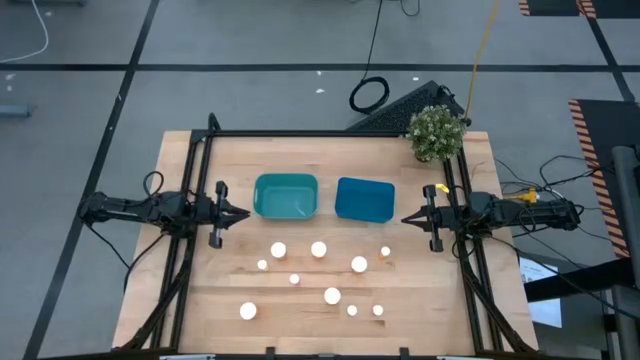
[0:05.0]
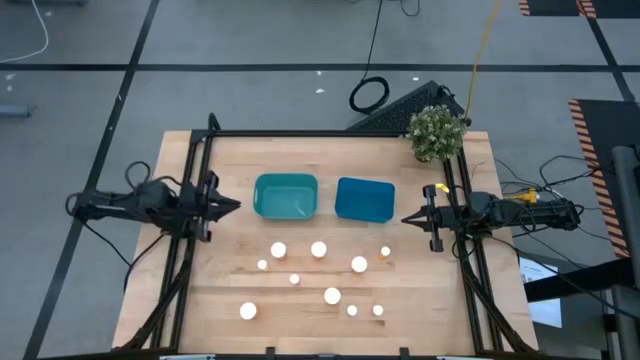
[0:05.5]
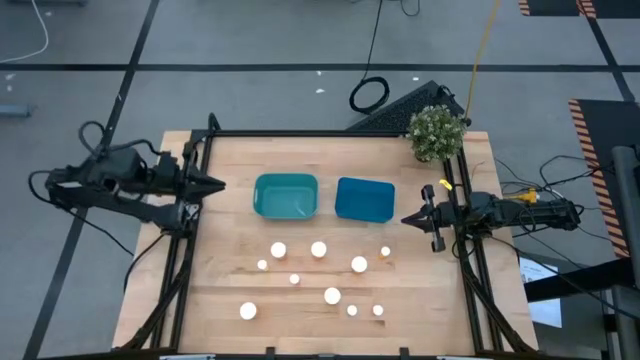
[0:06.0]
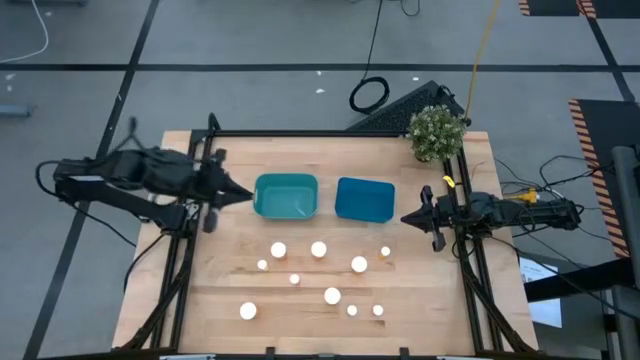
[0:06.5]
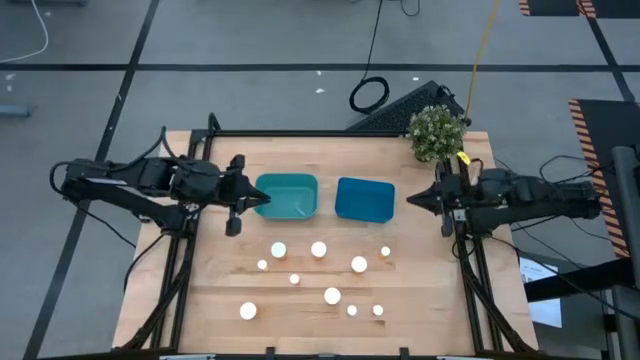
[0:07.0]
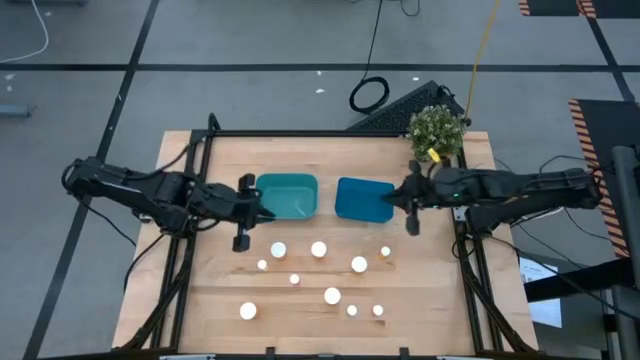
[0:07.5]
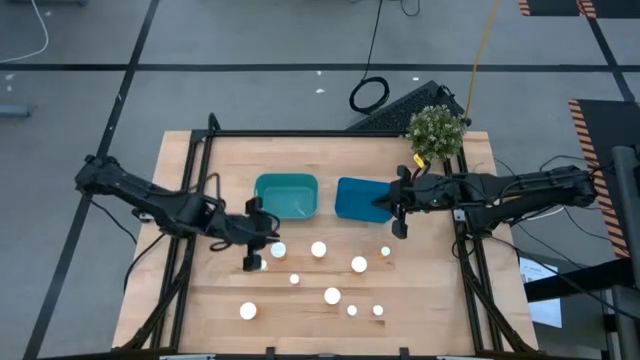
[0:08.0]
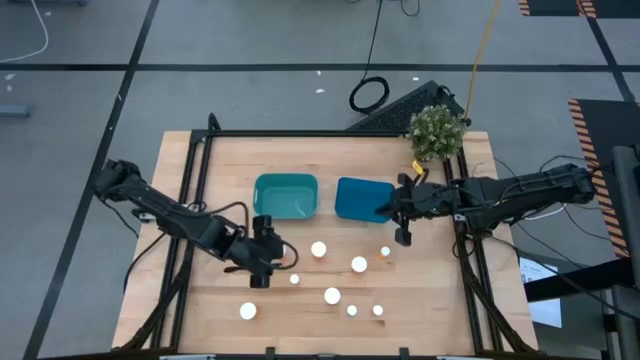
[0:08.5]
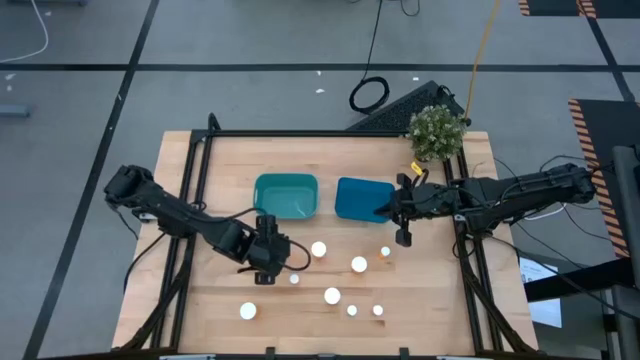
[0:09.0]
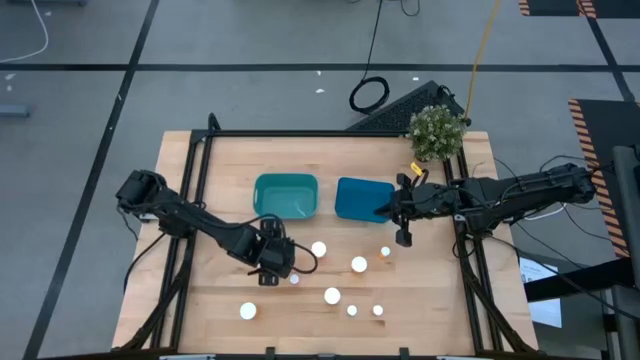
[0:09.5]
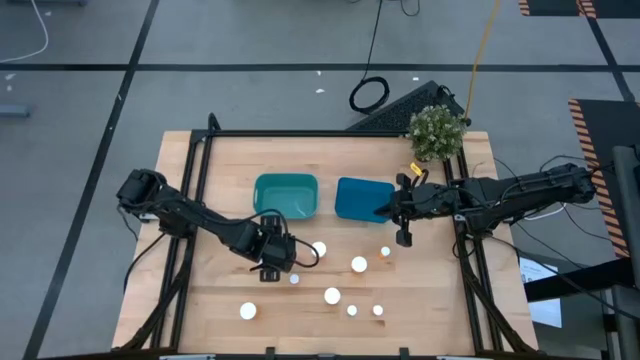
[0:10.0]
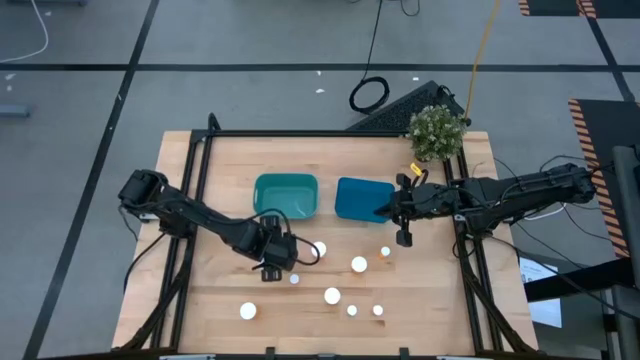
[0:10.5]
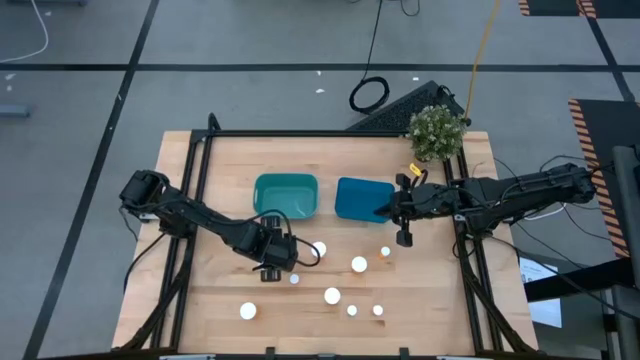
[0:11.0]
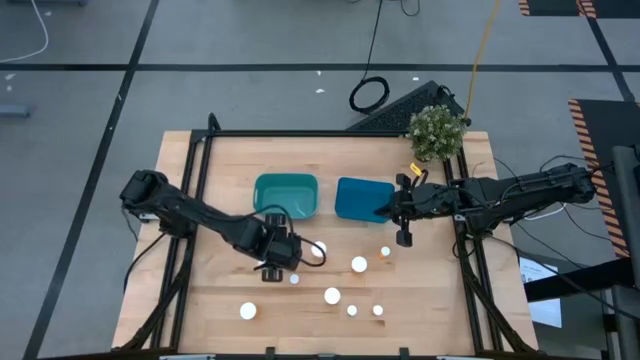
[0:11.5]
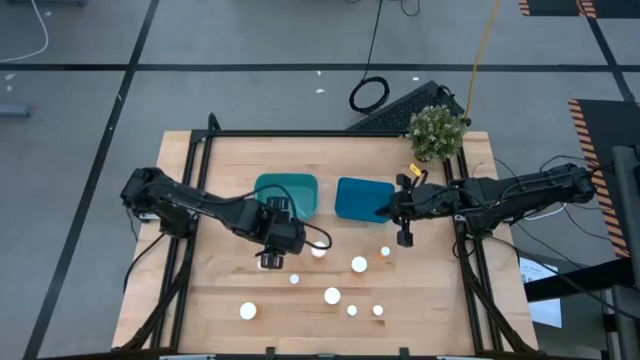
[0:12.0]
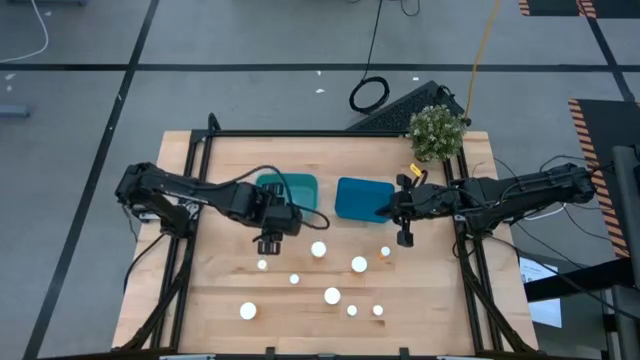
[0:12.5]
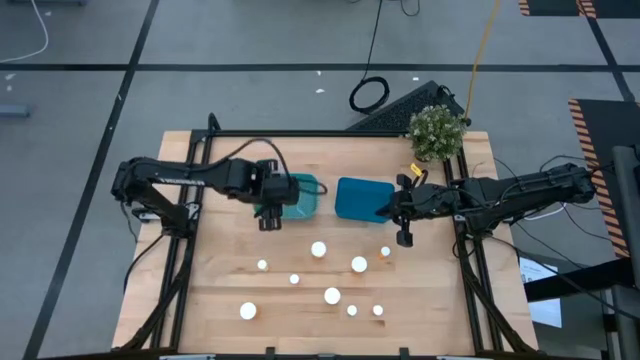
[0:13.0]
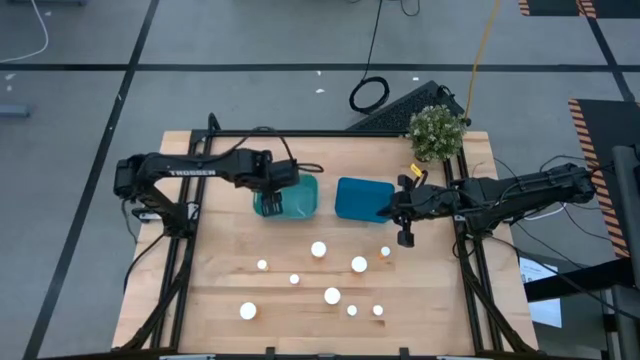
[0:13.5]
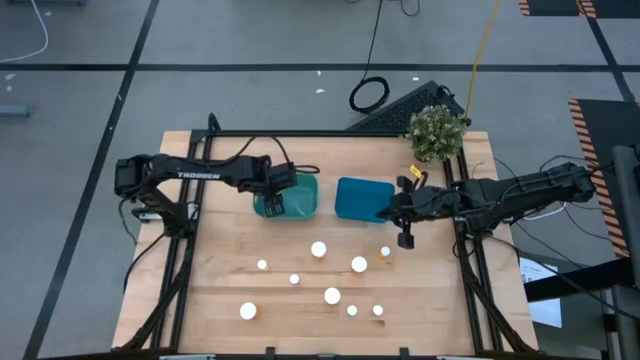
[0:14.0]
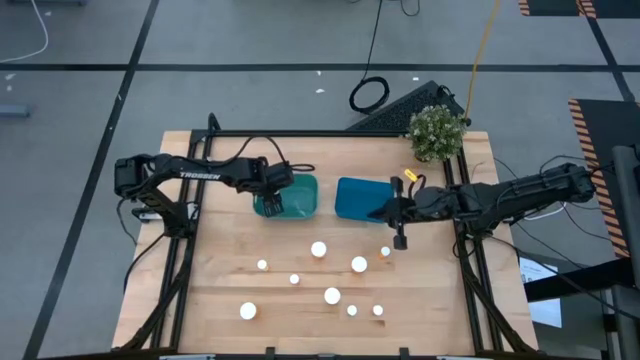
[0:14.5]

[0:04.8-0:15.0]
Task: Pick and place medicine bottles into bin by pill shape (circle, oval)
Put the large orange capsule bottle into the green bin

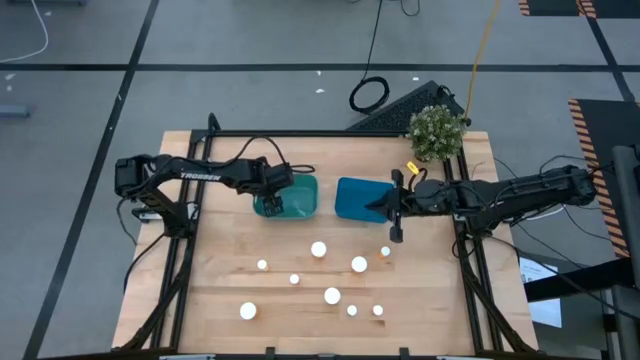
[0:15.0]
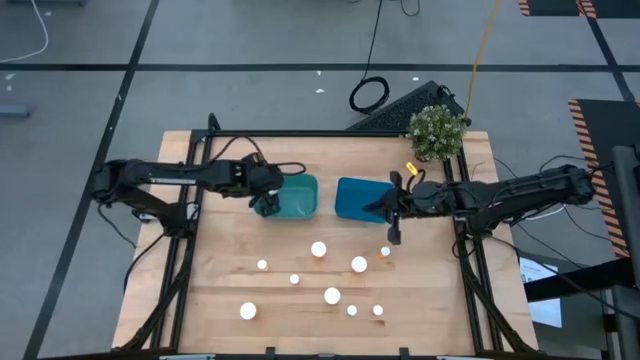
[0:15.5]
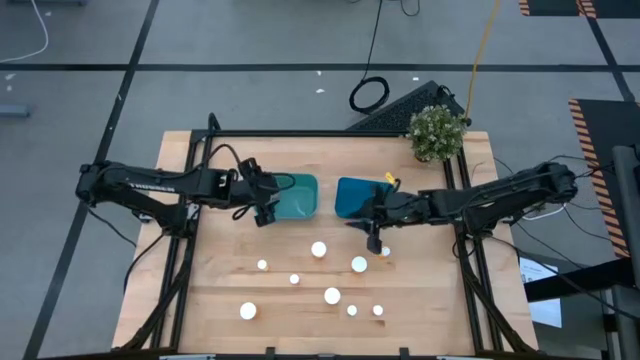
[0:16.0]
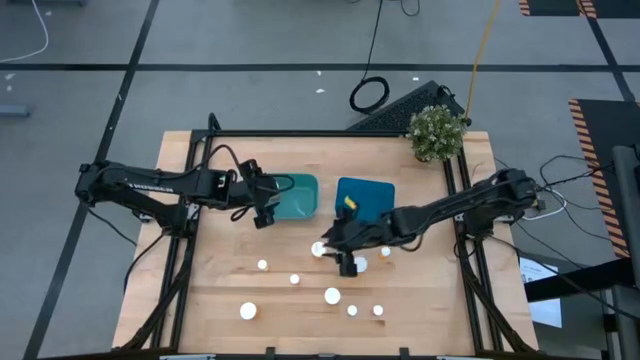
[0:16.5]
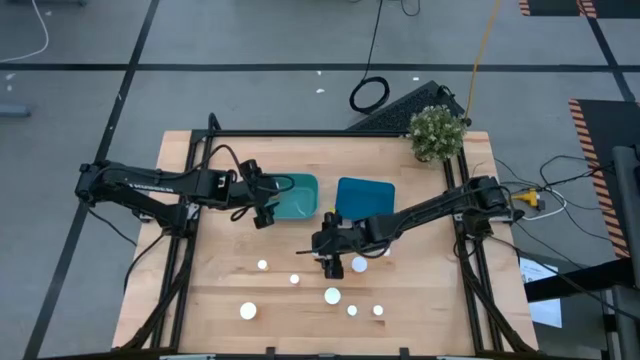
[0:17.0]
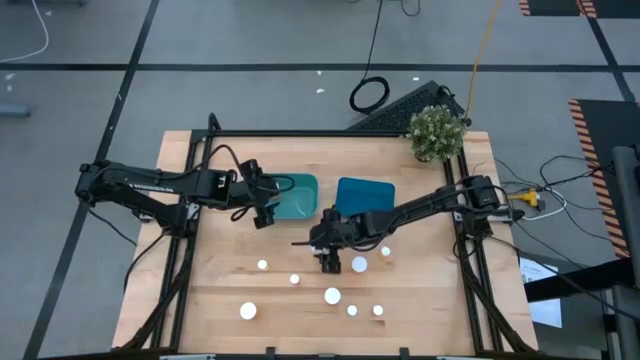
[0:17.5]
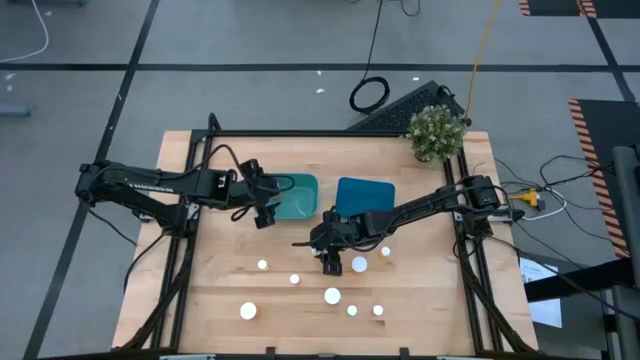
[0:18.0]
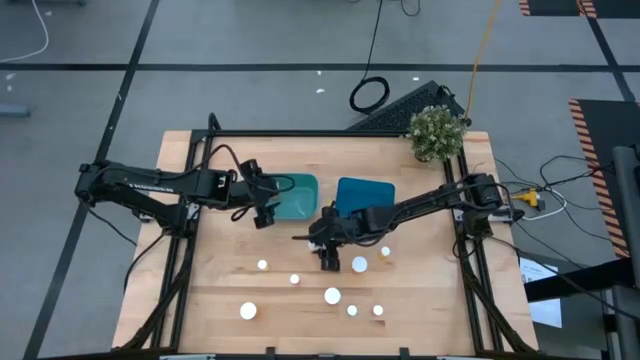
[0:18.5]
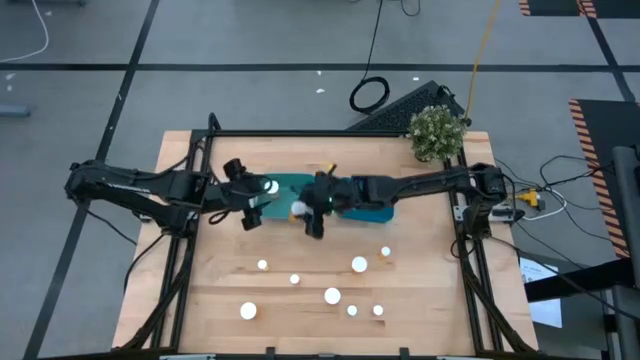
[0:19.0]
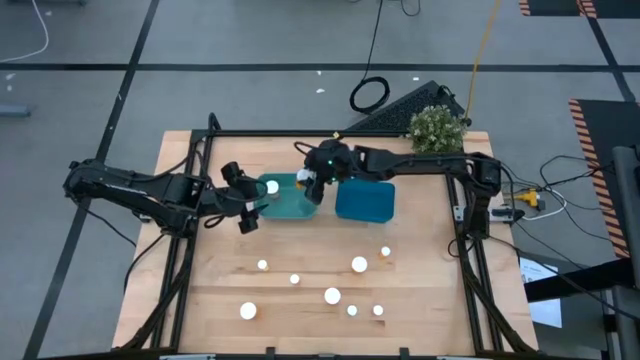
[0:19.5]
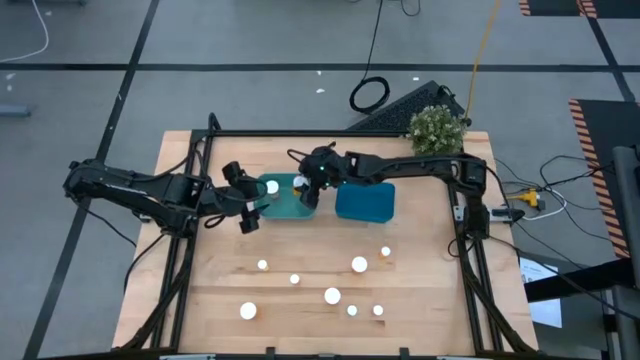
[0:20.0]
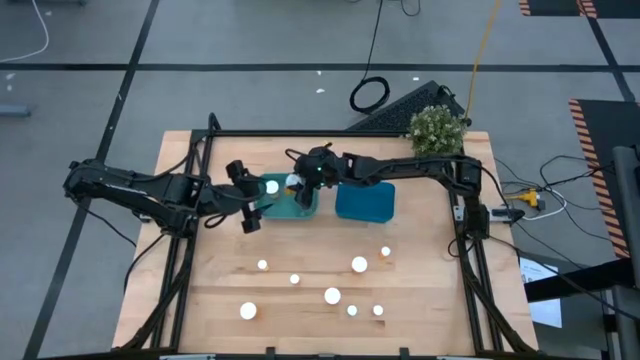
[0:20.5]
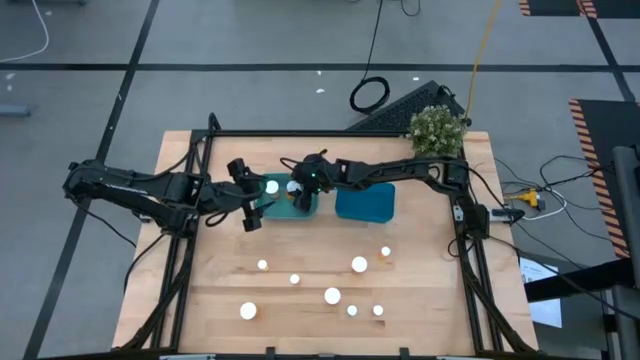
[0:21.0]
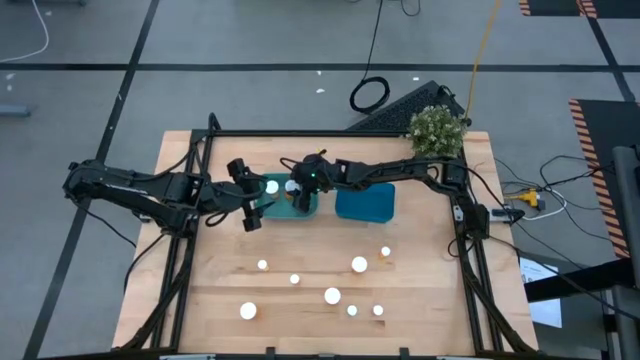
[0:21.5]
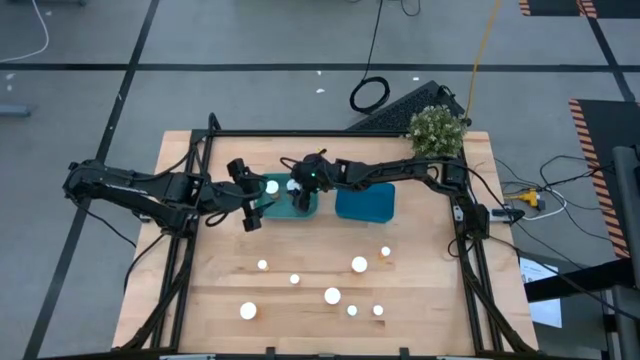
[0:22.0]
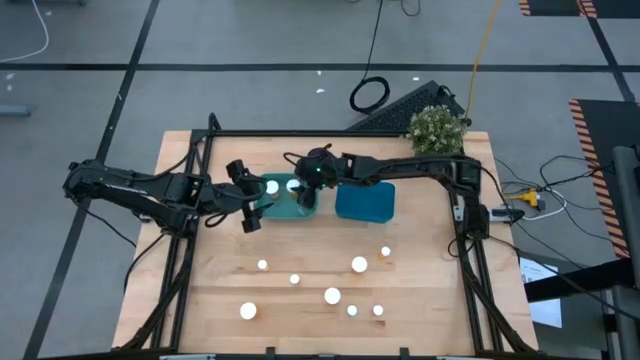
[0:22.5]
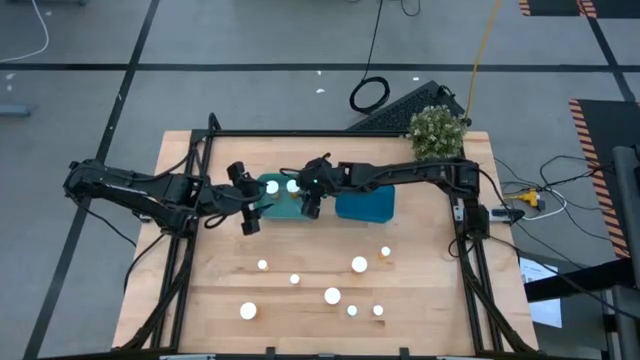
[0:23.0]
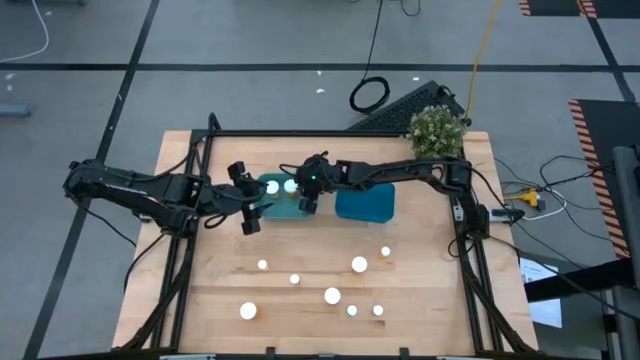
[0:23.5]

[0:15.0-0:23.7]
Put the large orange capsule bottle into the green bin

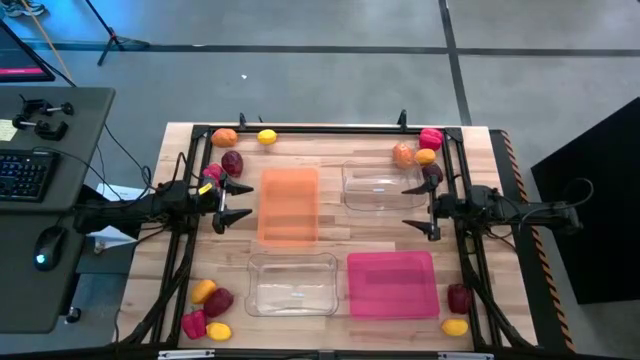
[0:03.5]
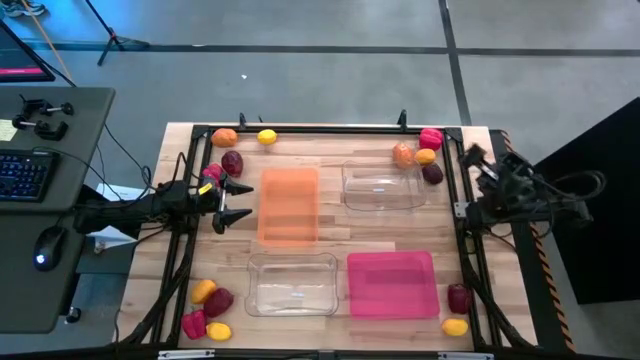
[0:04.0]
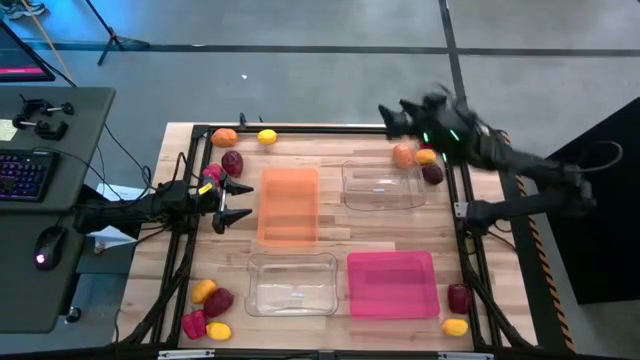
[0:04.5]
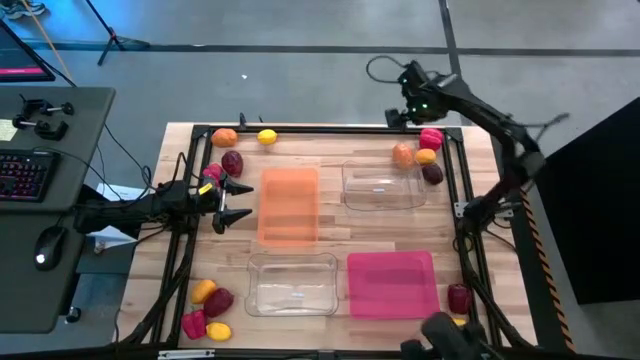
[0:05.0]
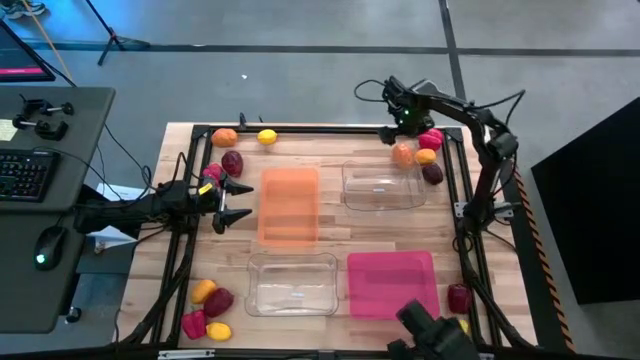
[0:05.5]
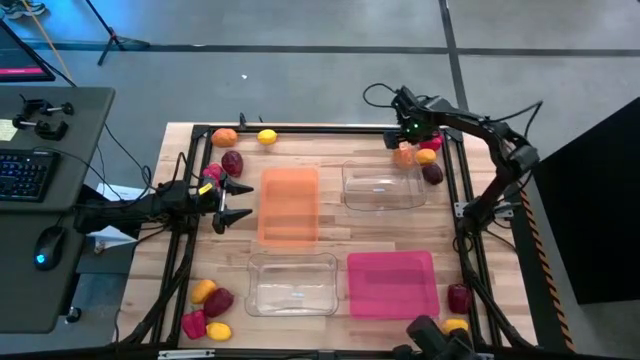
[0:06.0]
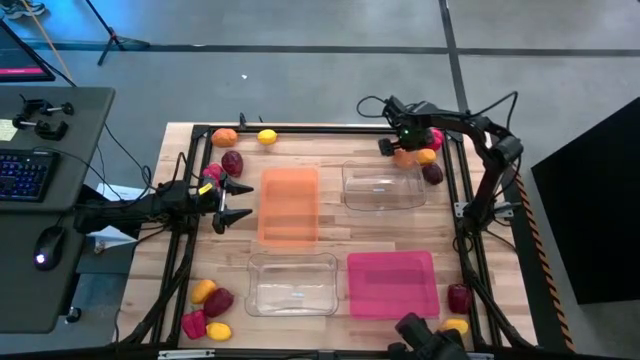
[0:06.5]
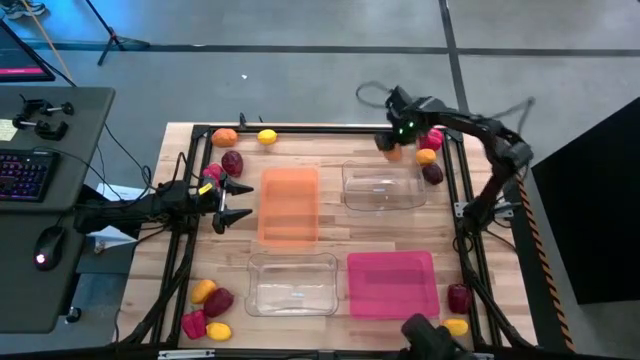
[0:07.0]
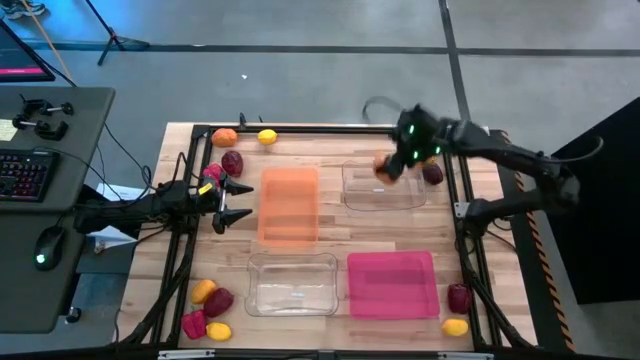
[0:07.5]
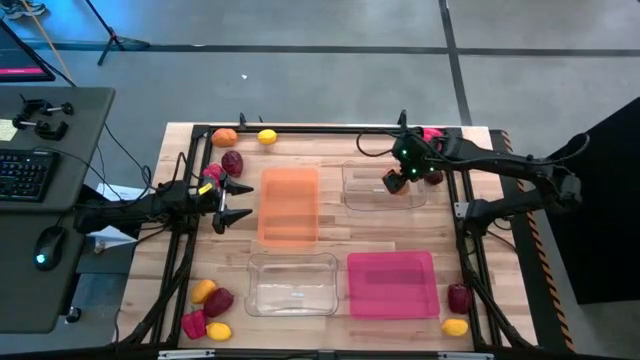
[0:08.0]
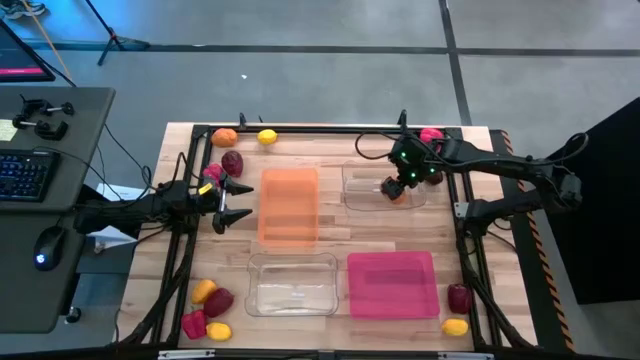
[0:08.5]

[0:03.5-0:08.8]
Task: Sort produce into baskets
Put the right mango into the top transparent bin
